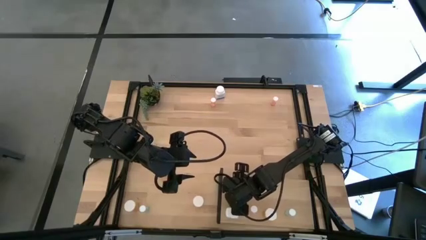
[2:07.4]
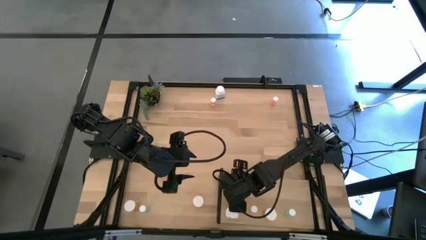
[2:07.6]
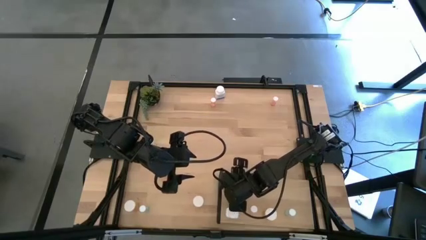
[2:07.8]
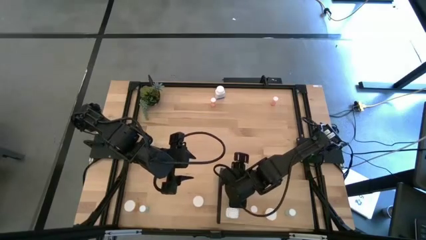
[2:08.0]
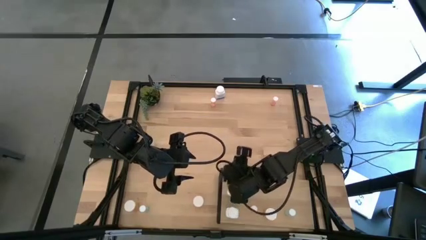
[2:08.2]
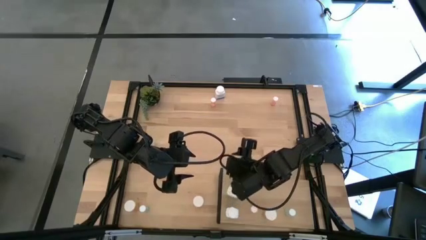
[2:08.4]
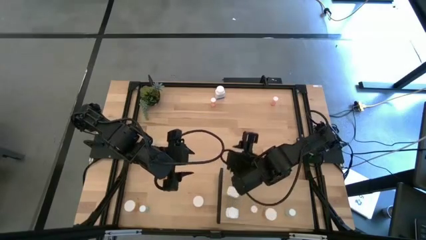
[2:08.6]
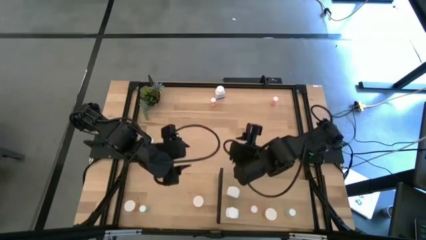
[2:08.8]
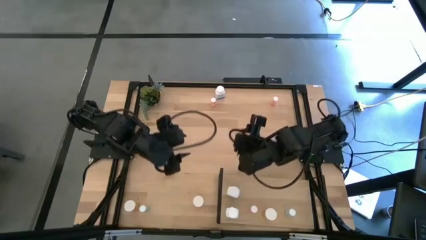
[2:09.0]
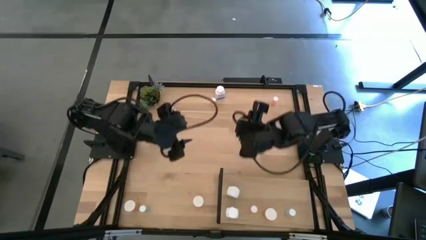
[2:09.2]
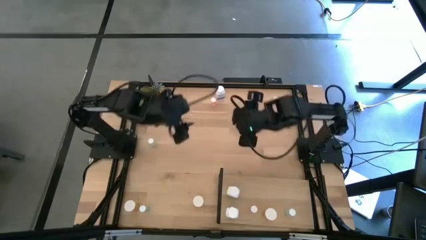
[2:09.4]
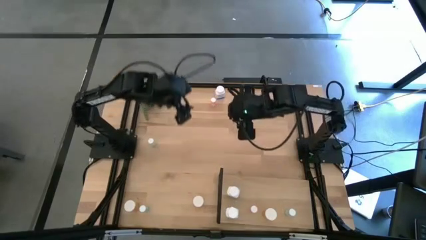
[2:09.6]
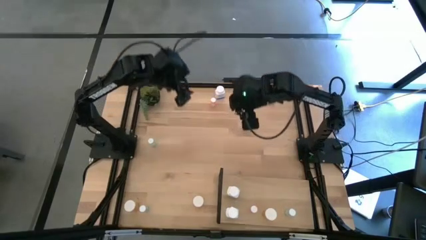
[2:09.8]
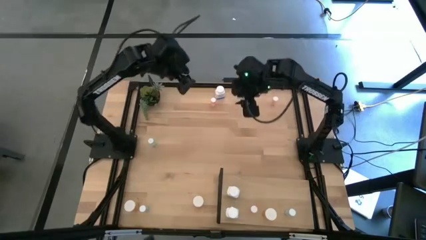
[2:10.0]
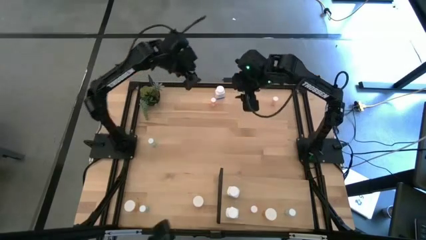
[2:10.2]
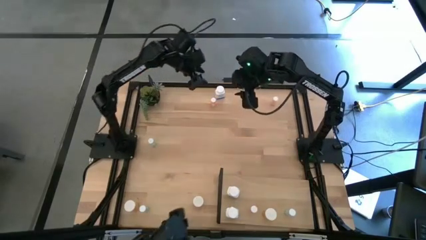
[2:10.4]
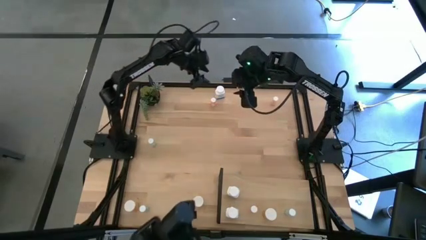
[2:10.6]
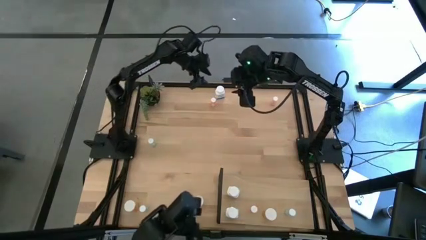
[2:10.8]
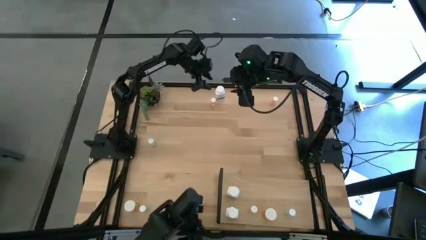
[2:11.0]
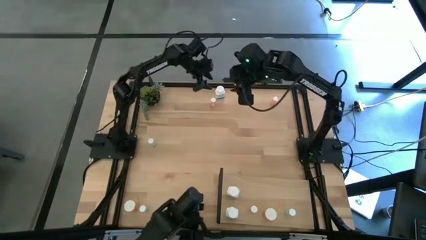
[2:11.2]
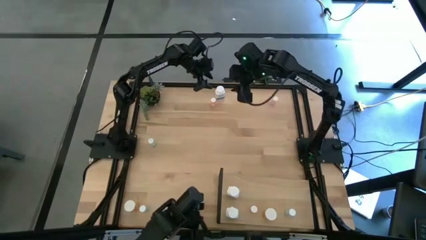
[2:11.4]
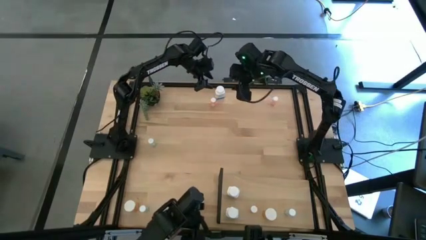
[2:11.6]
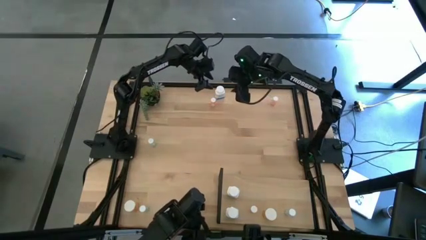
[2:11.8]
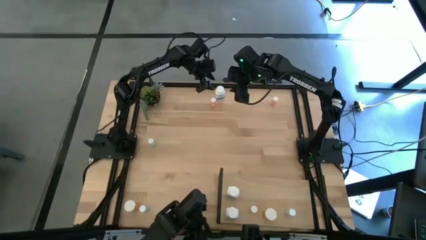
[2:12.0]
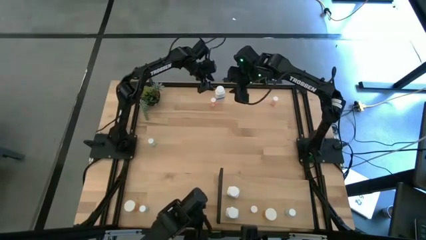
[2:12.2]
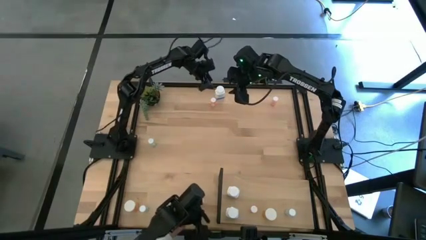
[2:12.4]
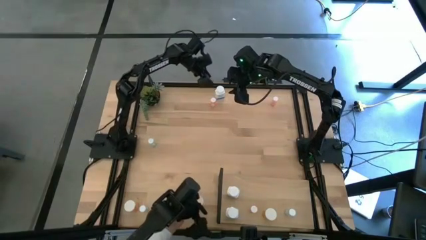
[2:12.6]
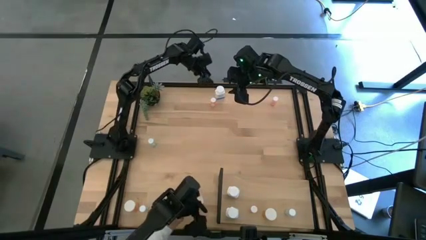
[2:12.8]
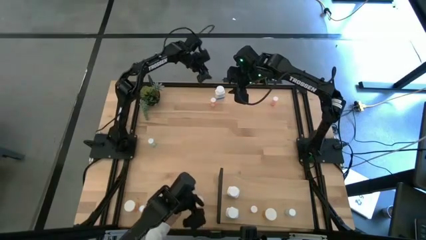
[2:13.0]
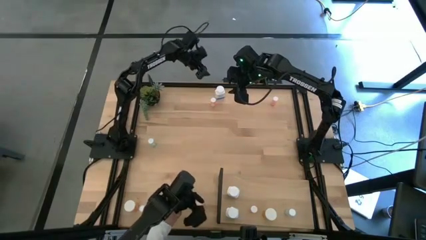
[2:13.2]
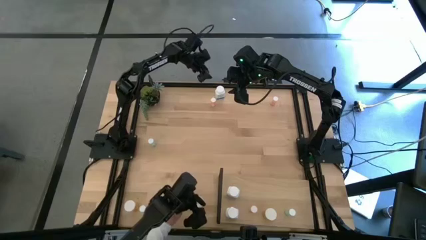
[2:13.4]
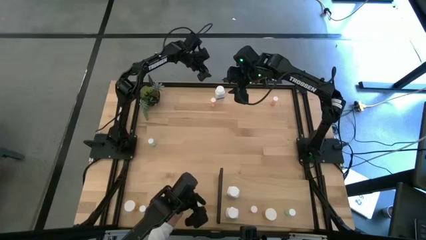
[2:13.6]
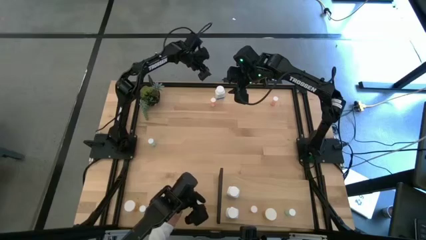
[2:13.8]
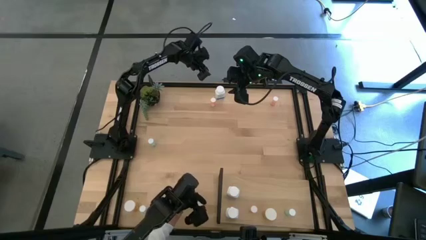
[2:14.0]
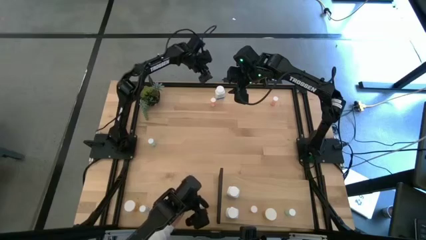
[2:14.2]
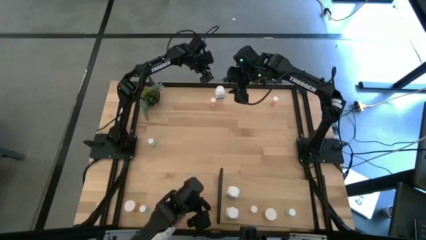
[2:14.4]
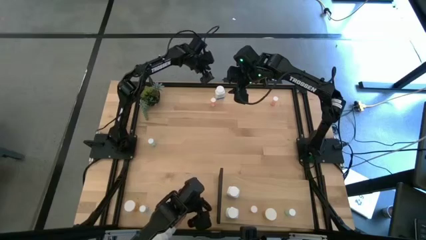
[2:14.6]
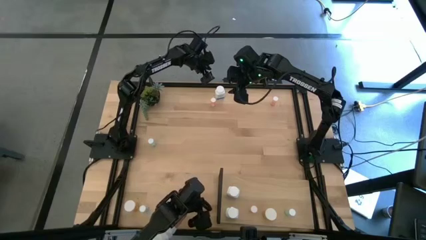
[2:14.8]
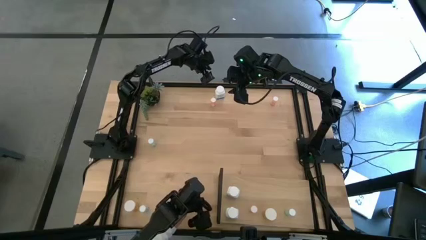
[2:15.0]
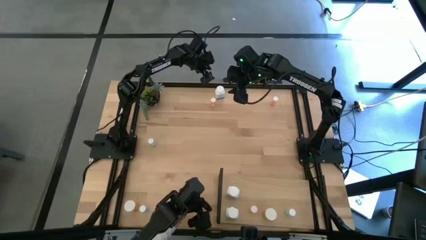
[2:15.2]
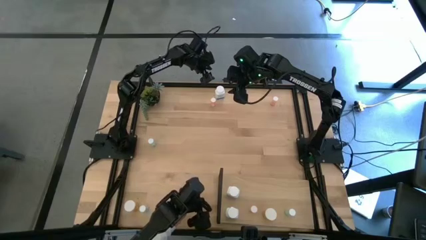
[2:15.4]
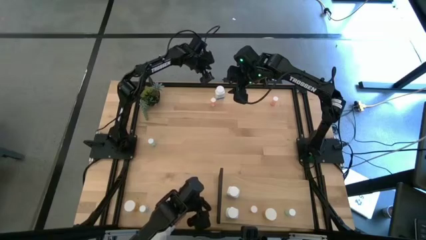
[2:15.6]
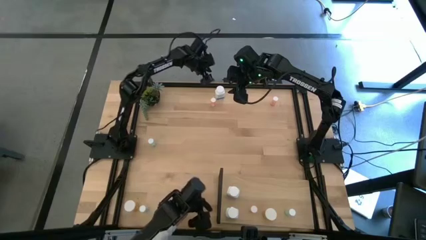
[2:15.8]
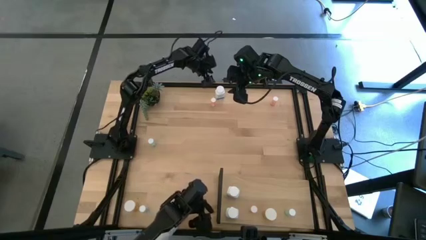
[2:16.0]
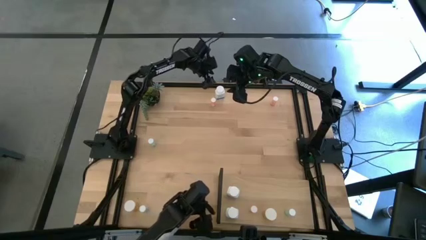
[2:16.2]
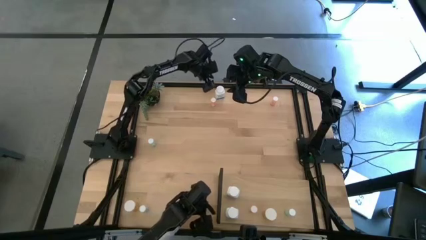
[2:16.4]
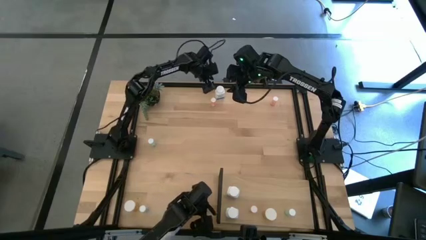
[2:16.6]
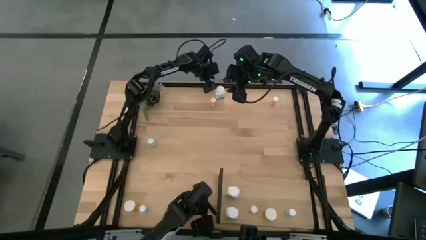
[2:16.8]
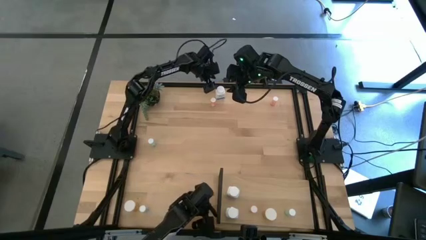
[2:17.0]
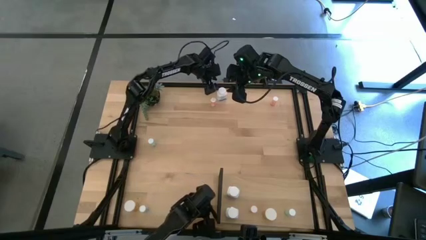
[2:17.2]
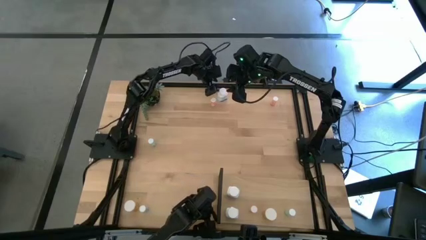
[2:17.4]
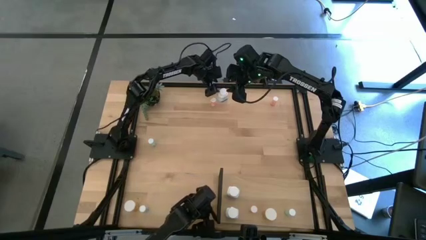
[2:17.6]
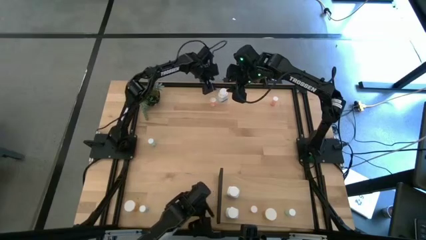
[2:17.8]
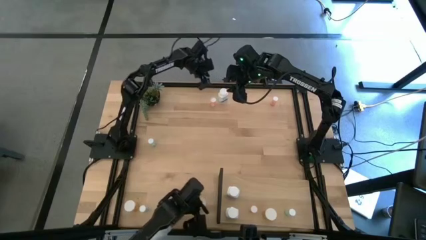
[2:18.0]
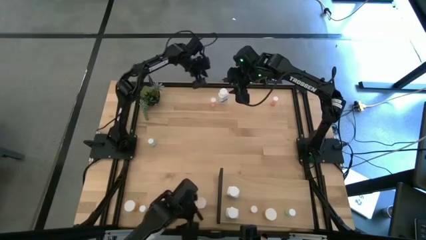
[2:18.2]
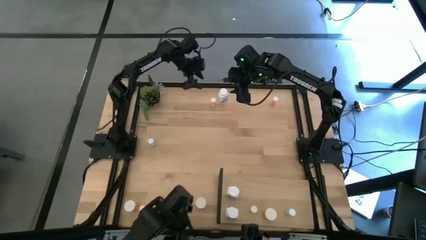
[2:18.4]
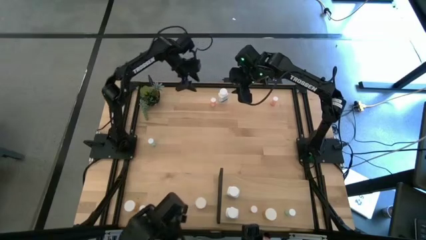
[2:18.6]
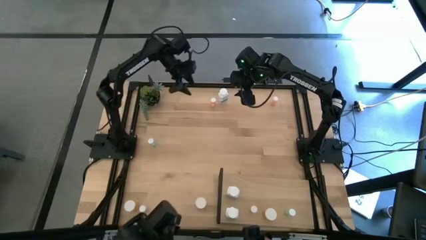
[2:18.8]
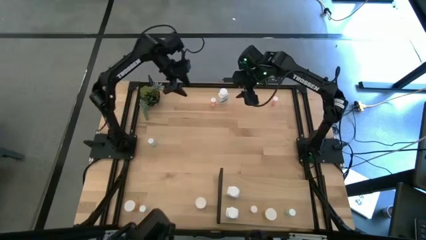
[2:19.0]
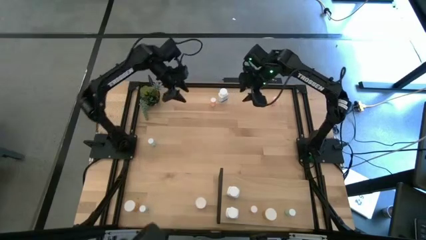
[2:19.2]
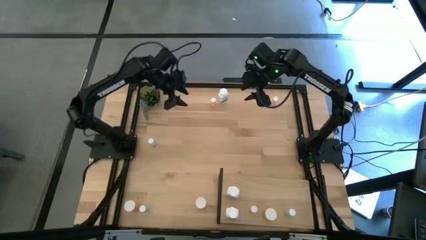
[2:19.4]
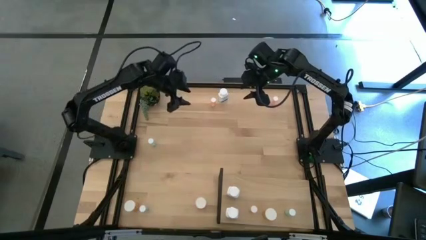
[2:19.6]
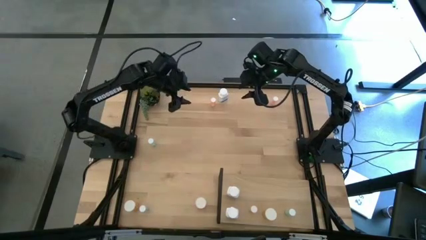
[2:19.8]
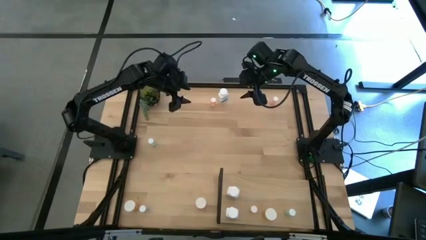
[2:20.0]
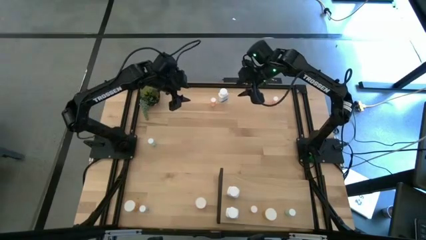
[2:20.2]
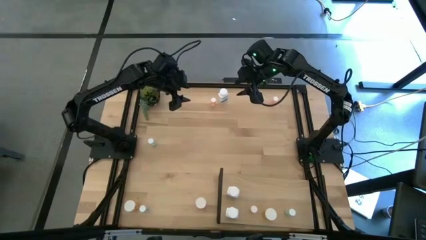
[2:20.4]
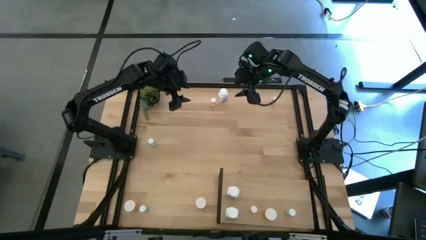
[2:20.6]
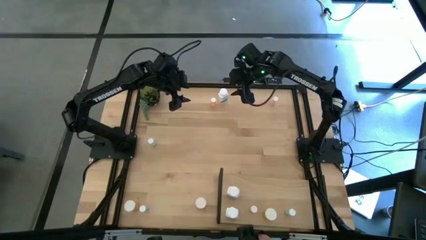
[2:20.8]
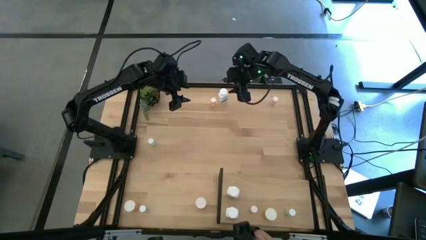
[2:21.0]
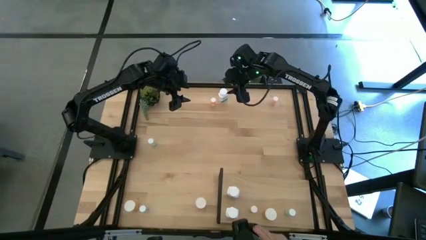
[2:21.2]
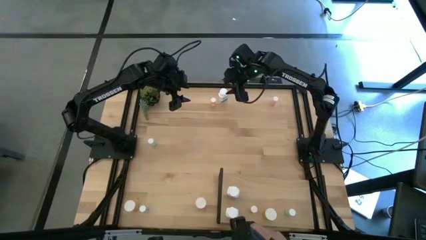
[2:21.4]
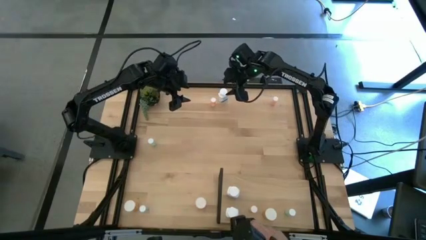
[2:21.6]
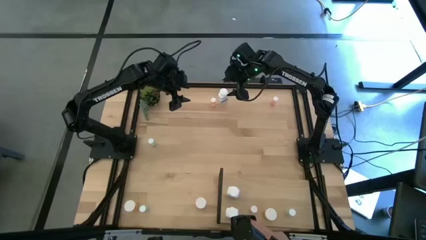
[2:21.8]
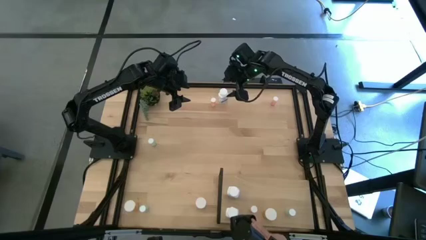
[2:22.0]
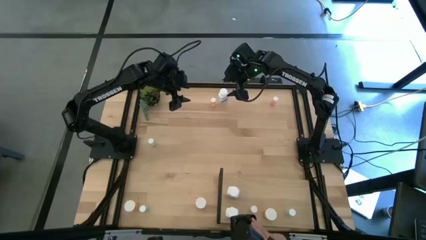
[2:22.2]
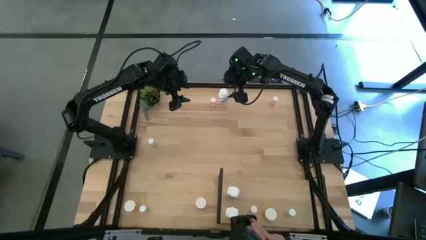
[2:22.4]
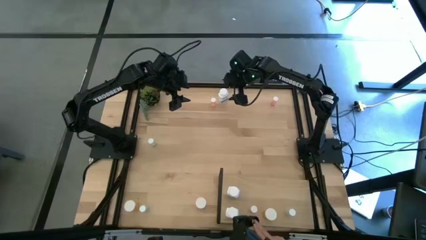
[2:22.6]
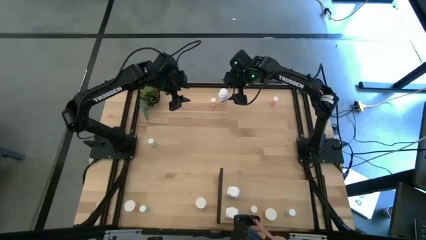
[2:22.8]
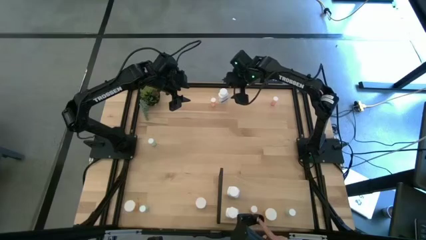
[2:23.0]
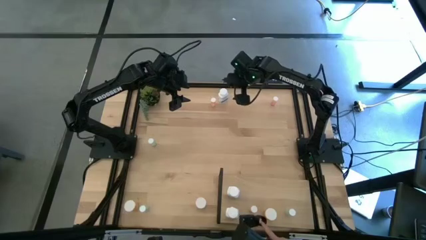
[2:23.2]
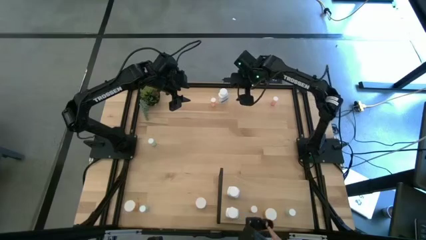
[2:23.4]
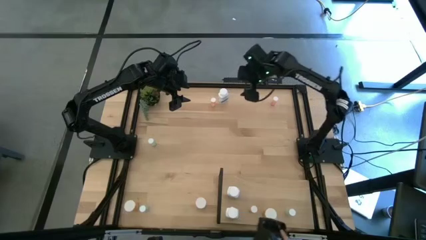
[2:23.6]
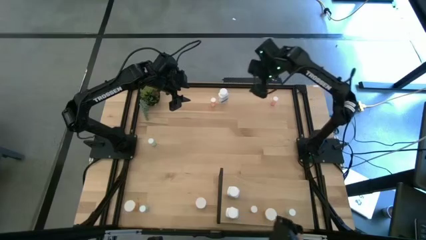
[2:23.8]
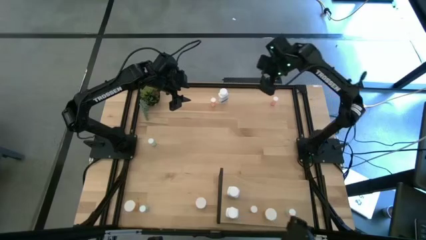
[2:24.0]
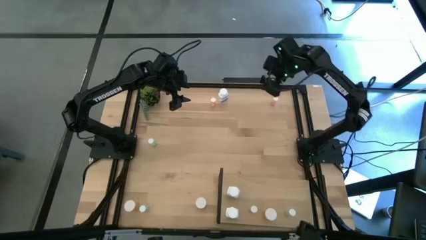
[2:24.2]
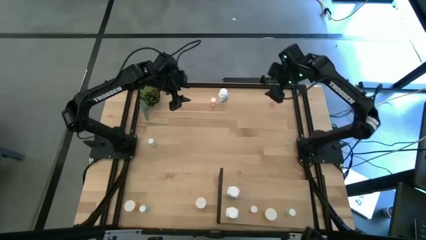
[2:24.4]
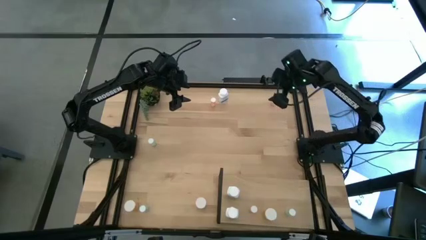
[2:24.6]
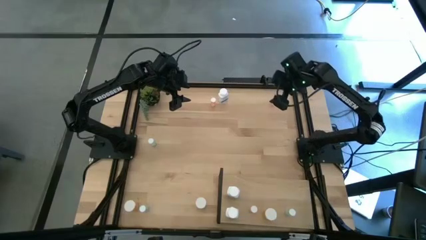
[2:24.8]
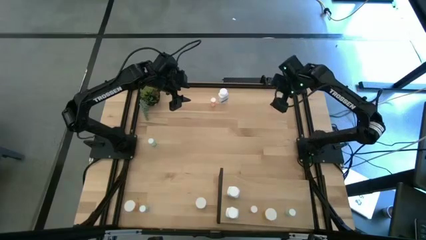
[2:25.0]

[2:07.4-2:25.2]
Task: Pick and place medicine bottles onto shelf by color
Put the top right pink pill bottle on the shelf
